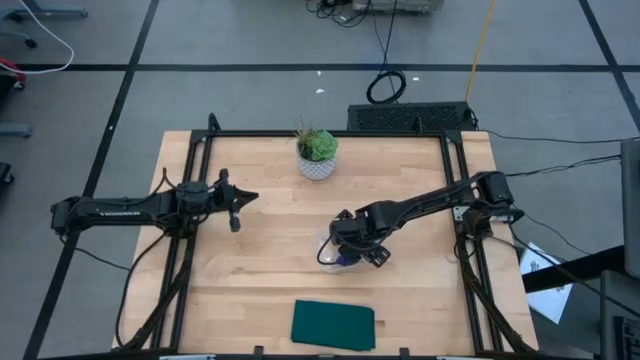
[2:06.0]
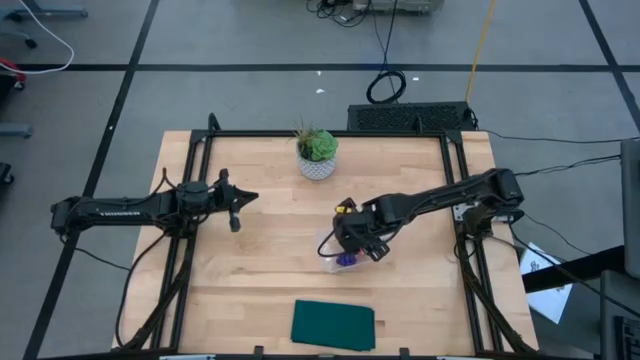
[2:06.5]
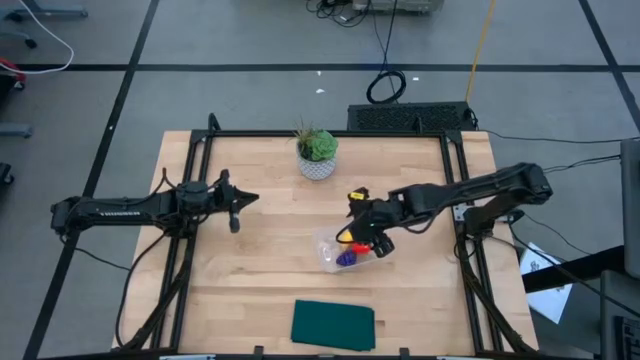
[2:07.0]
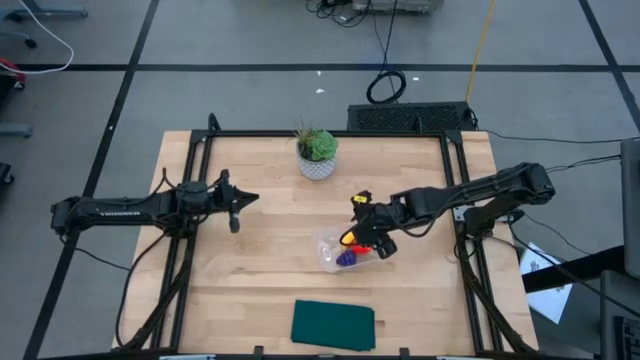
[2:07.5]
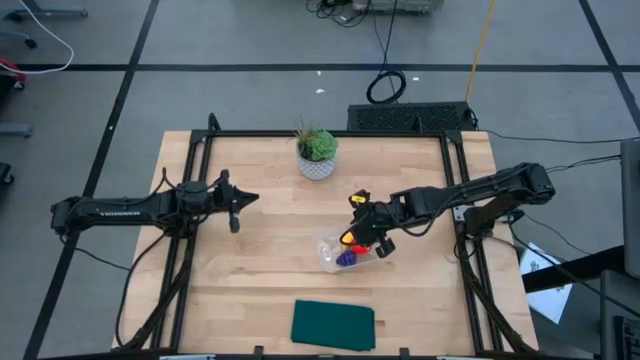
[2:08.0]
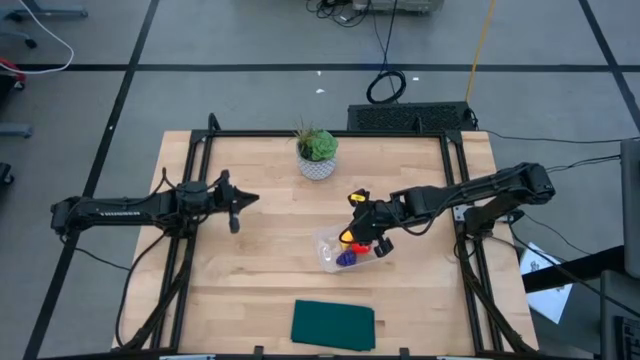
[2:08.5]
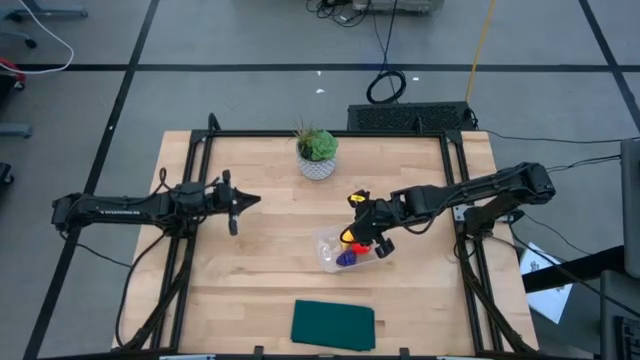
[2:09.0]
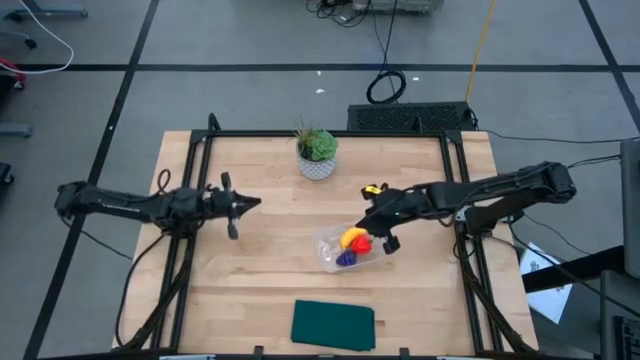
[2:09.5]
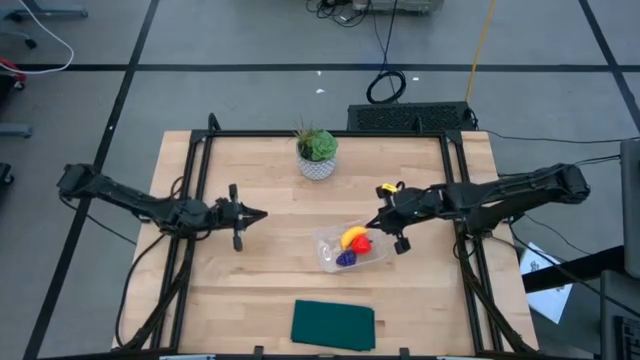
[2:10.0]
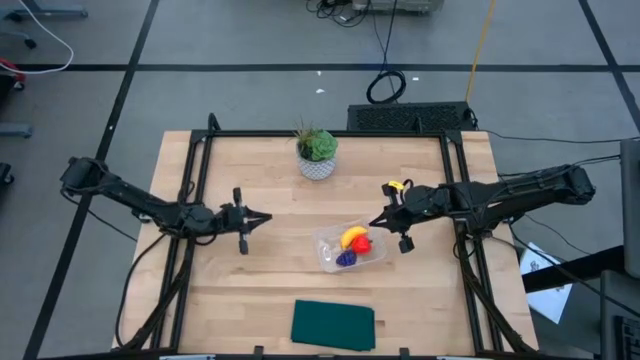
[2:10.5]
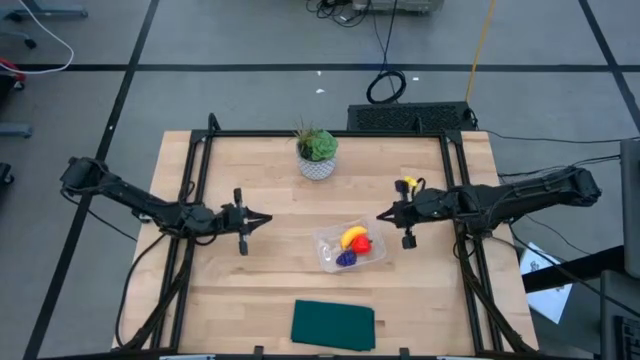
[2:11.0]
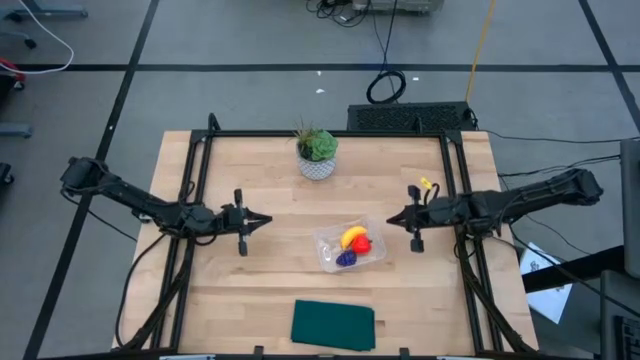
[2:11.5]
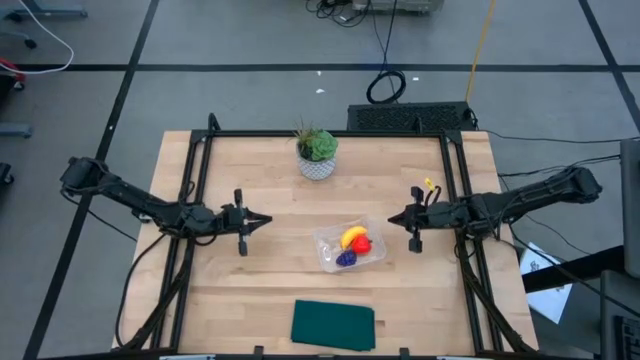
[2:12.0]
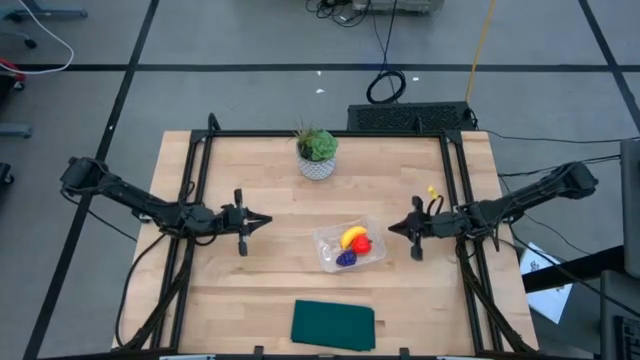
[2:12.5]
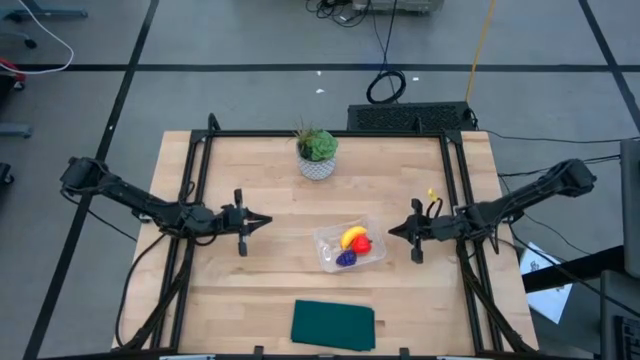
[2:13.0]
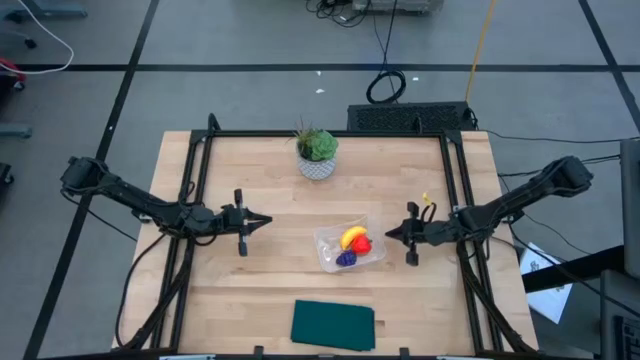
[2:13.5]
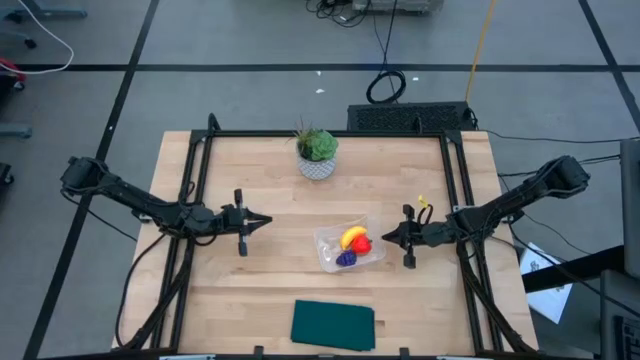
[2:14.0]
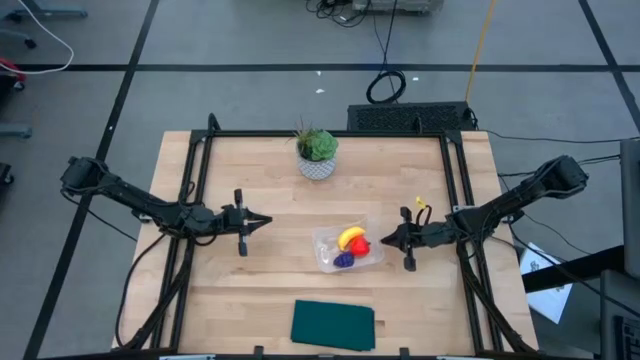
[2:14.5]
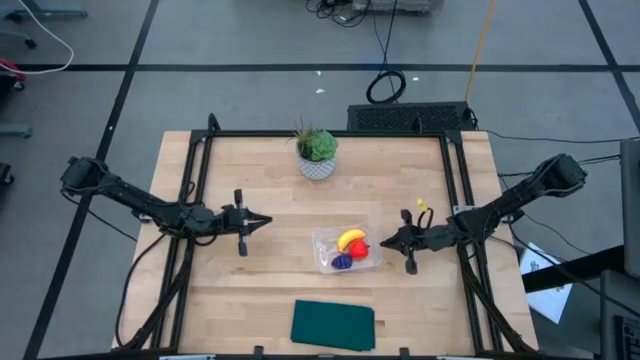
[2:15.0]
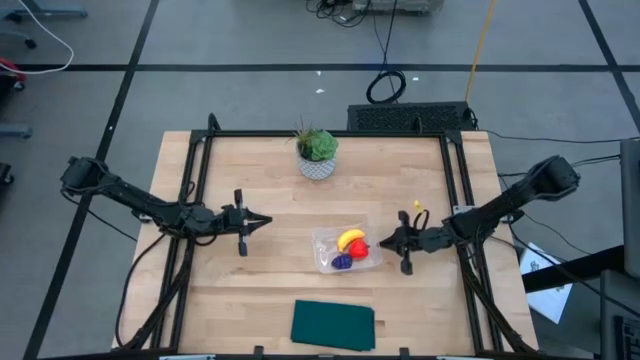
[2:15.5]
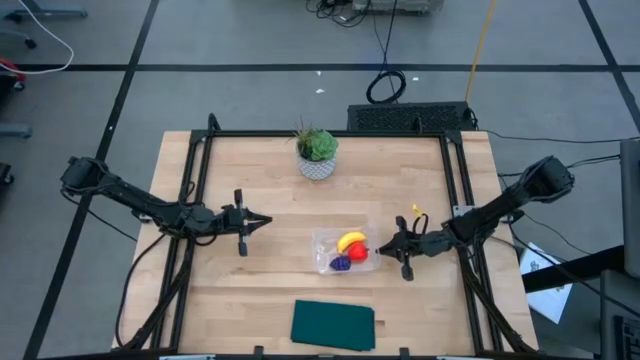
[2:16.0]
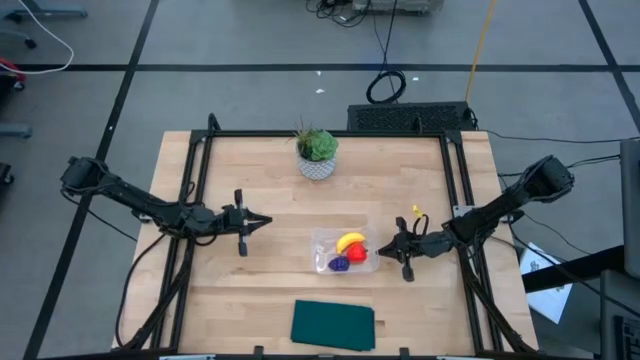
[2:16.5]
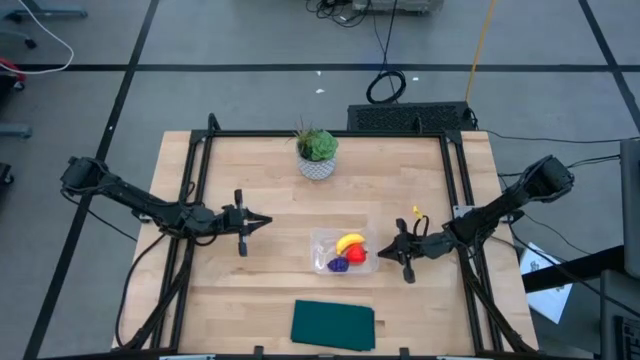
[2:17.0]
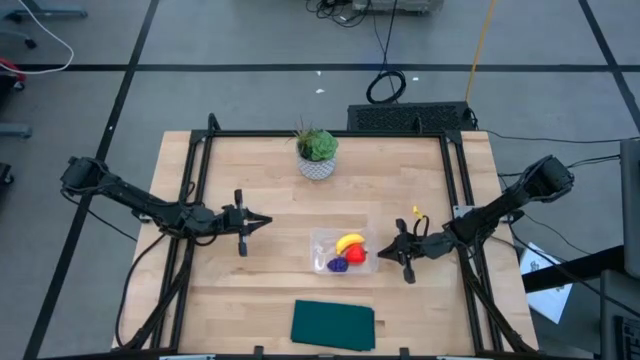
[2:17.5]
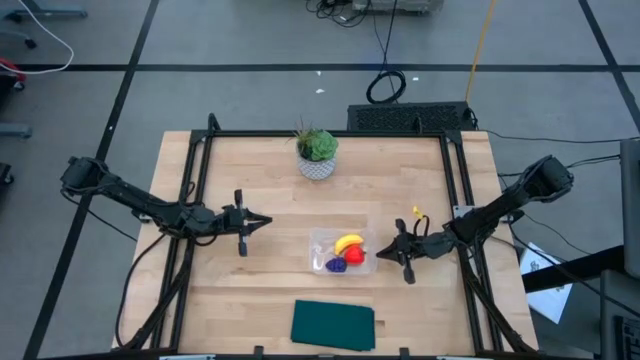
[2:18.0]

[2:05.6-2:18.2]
Task: Pick and placing Produce into tupperware
Adjust the transparent bin

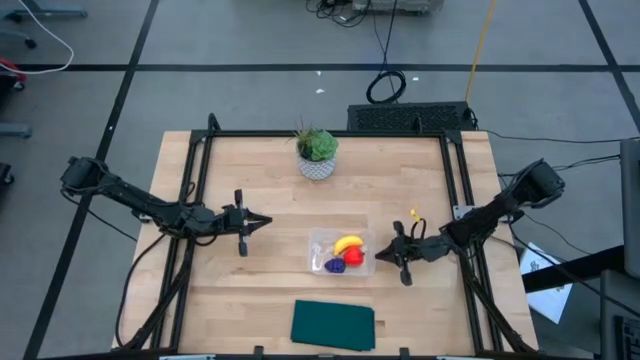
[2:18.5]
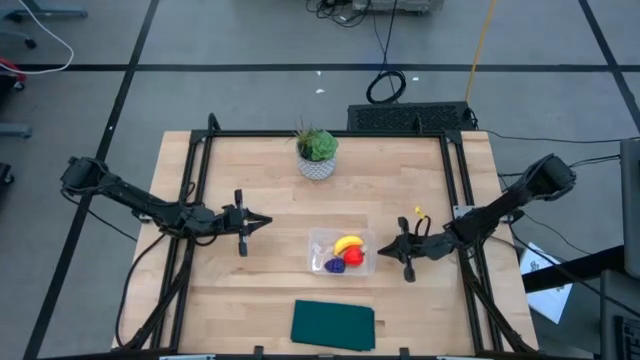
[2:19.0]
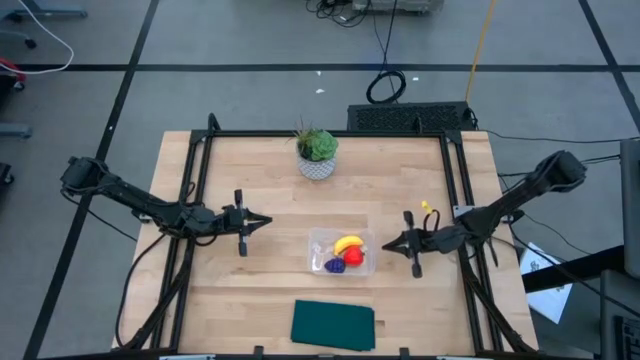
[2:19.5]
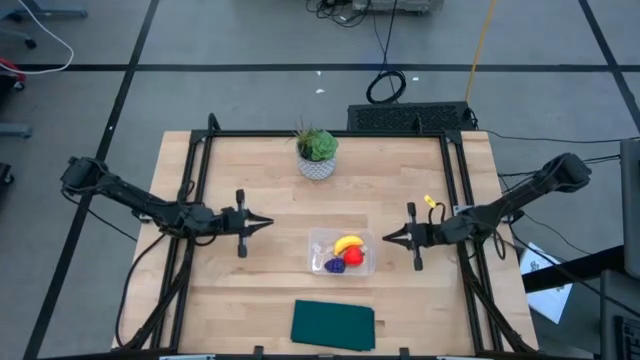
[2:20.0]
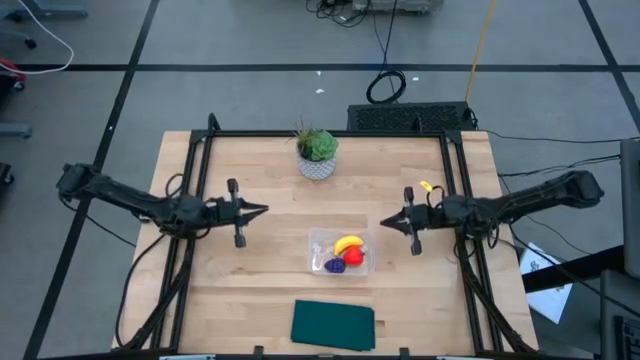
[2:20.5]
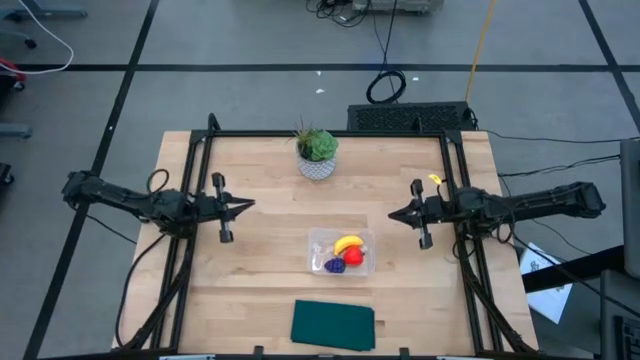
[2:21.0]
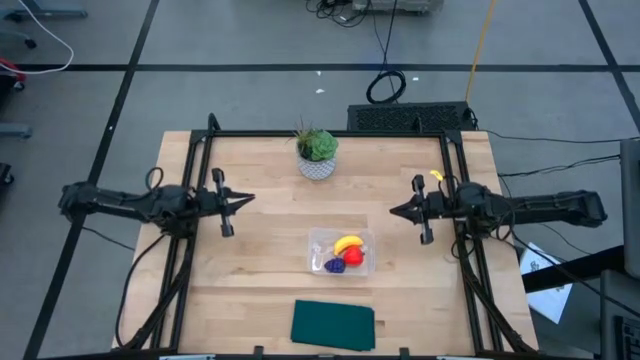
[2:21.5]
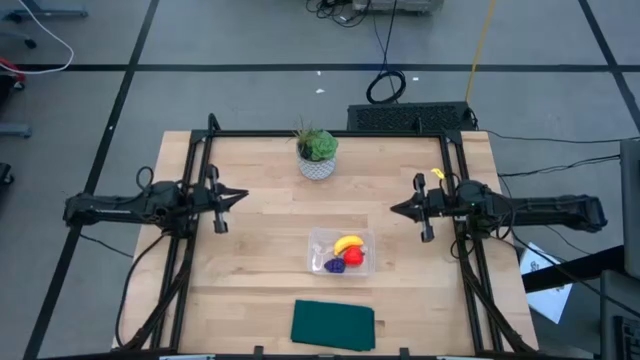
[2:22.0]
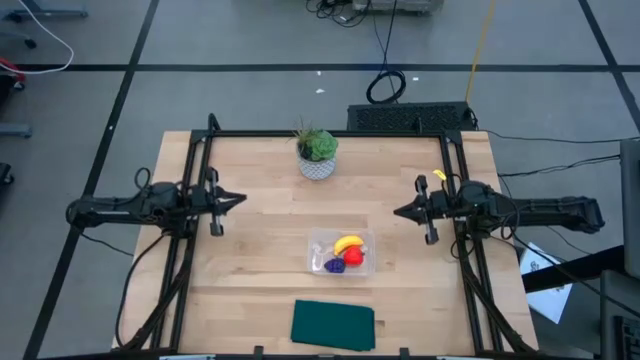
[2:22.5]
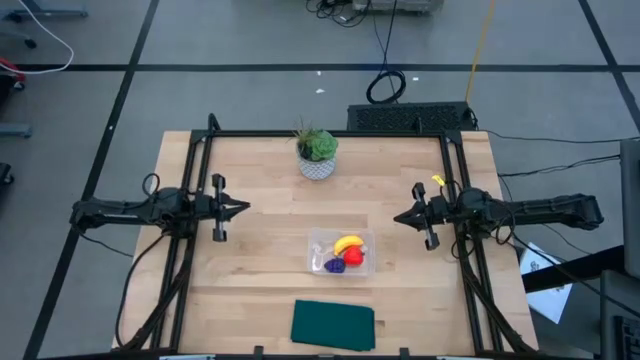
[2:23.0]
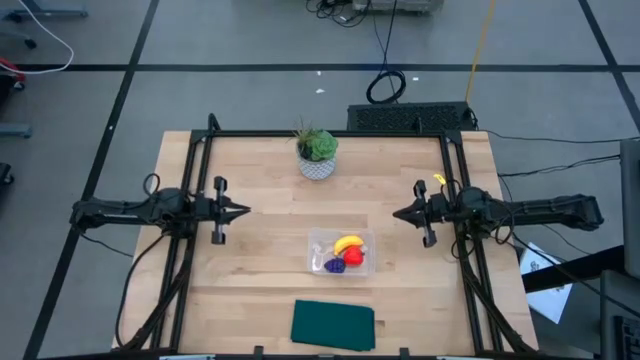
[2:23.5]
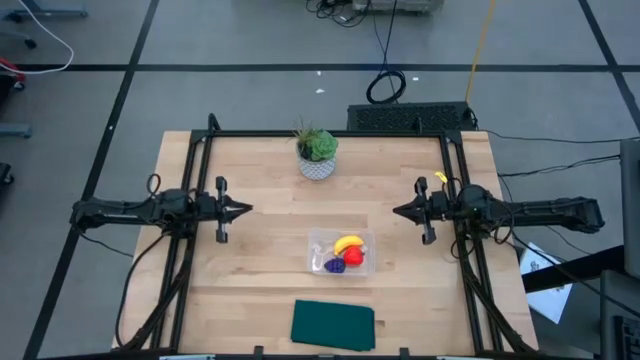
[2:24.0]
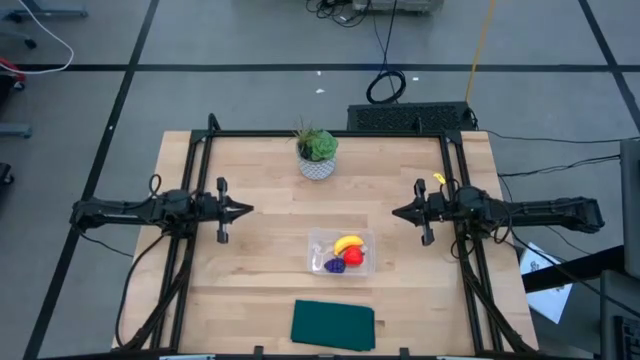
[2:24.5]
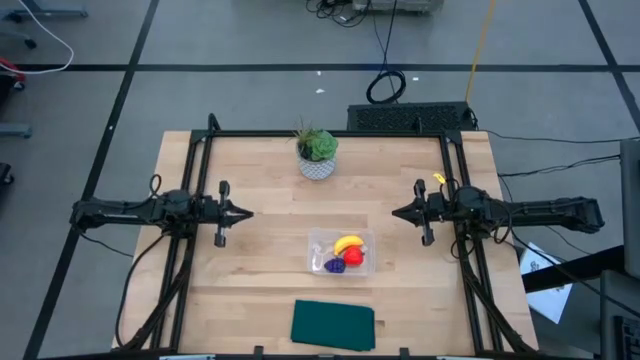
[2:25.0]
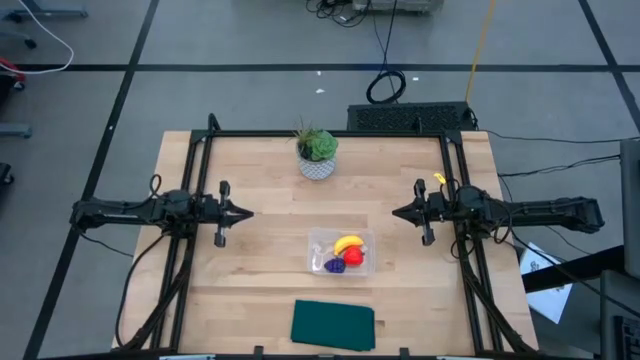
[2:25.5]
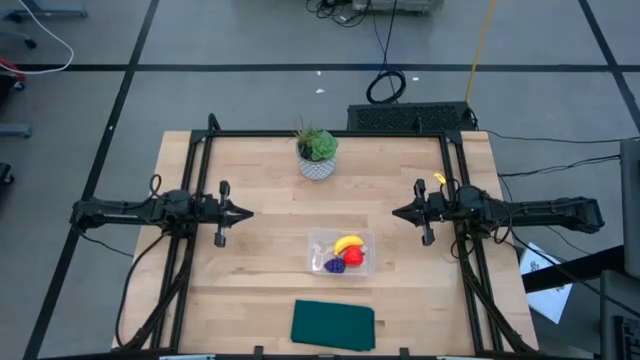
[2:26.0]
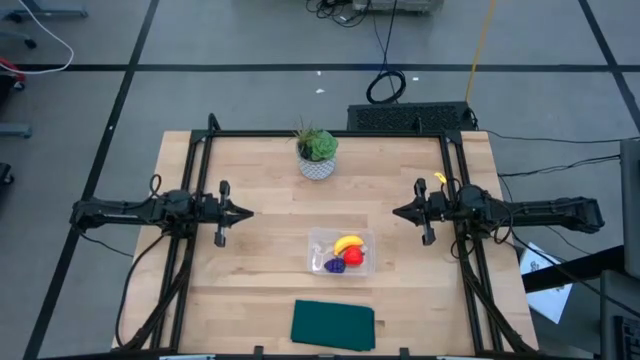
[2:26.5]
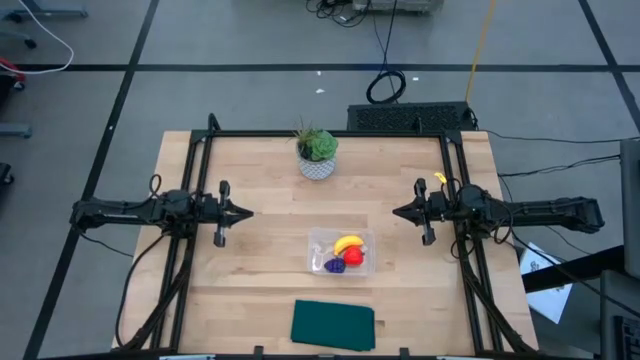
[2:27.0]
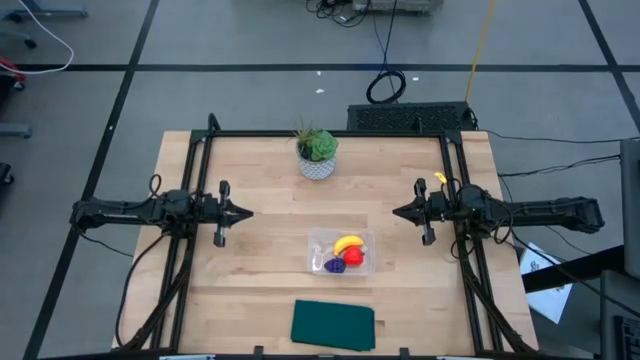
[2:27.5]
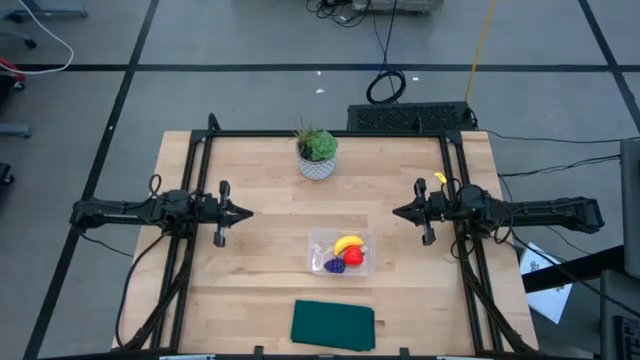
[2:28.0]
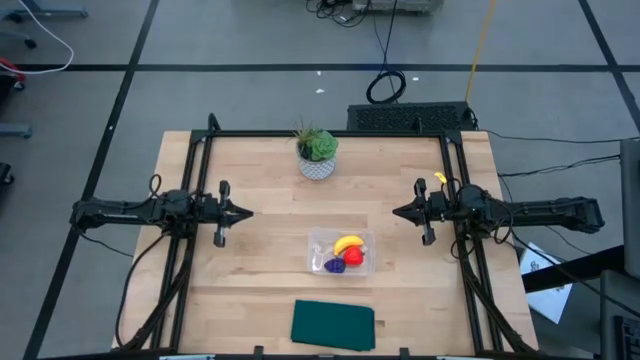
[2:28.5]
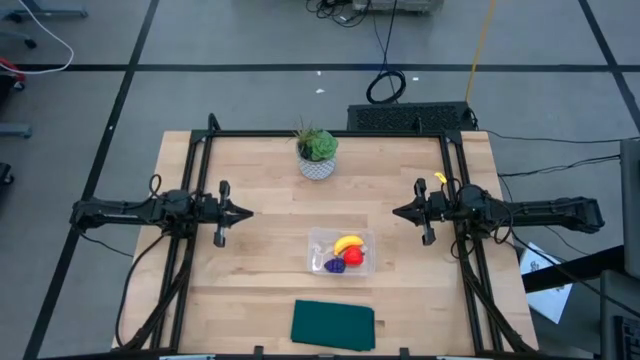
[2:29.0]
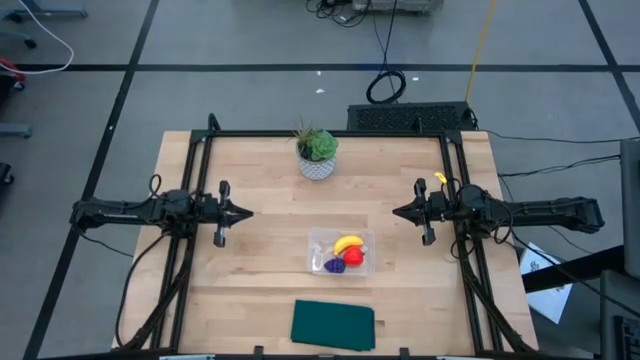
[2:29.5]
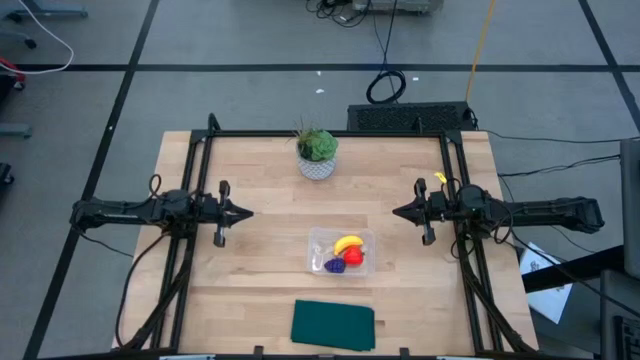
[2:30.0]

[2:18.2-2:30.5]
Return to Home Position
